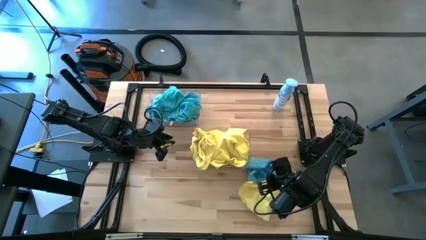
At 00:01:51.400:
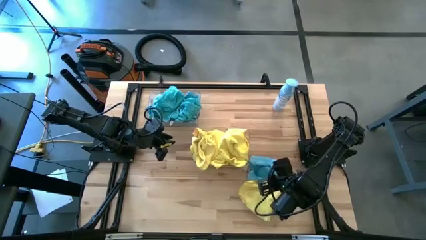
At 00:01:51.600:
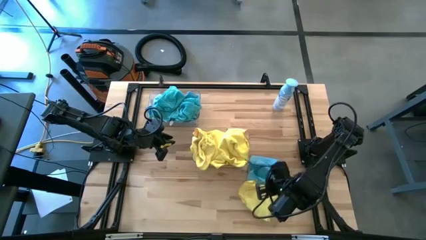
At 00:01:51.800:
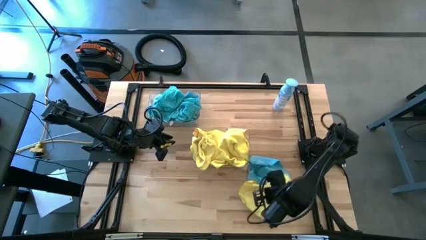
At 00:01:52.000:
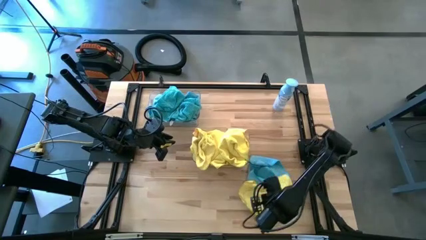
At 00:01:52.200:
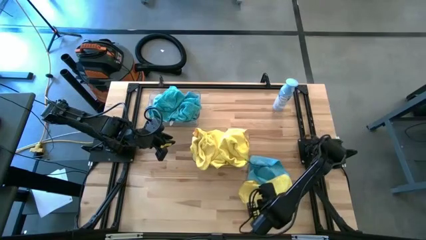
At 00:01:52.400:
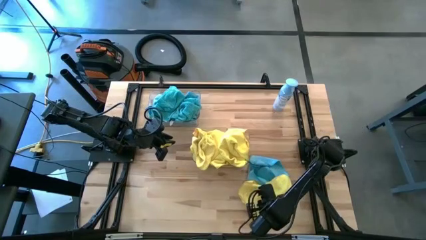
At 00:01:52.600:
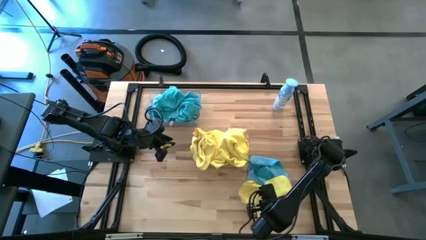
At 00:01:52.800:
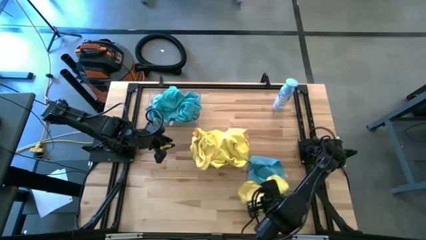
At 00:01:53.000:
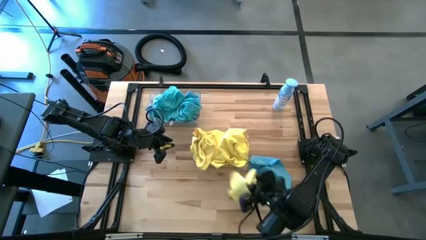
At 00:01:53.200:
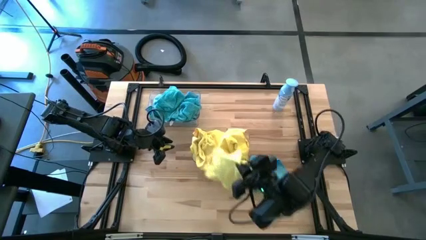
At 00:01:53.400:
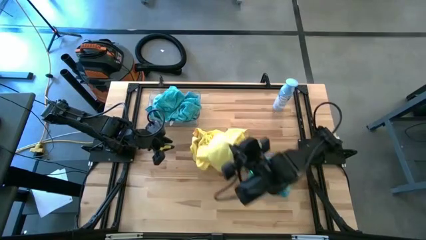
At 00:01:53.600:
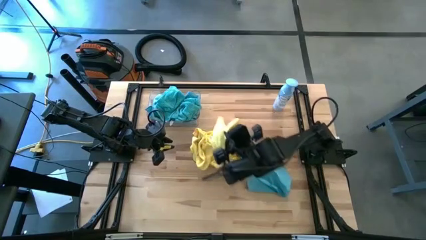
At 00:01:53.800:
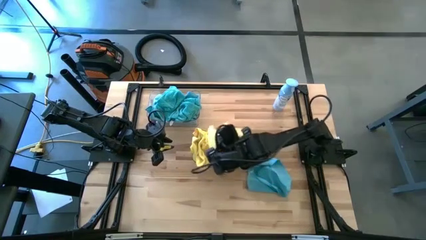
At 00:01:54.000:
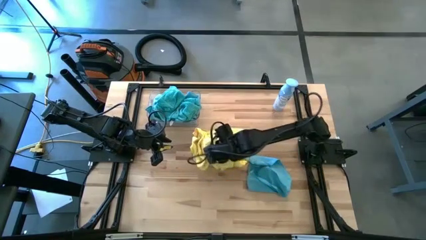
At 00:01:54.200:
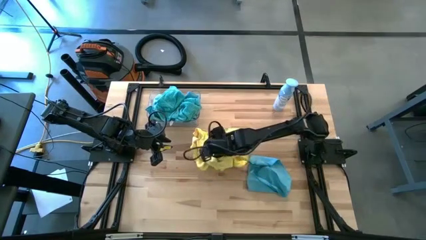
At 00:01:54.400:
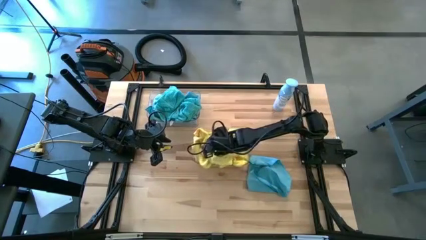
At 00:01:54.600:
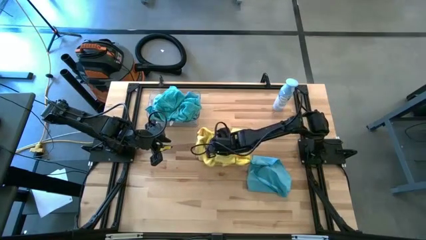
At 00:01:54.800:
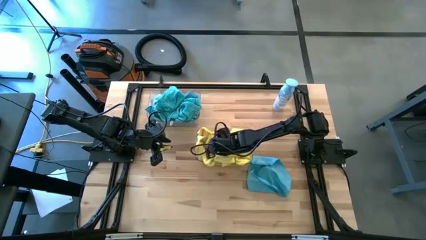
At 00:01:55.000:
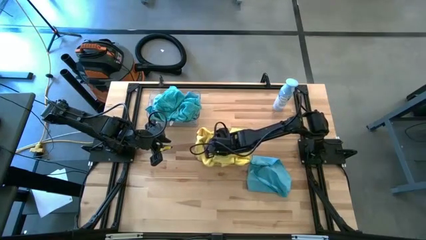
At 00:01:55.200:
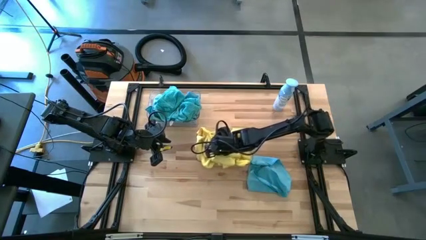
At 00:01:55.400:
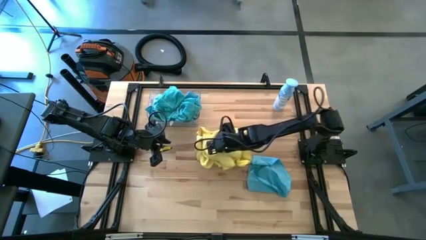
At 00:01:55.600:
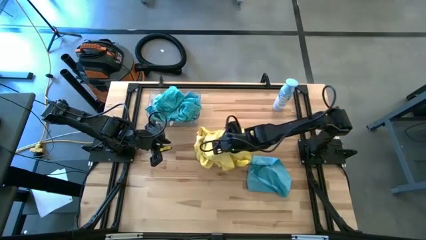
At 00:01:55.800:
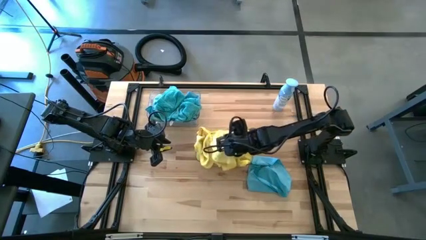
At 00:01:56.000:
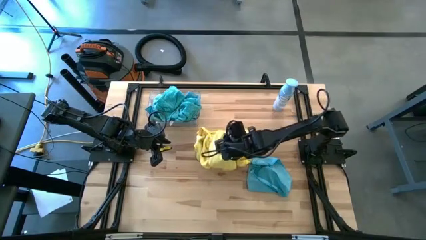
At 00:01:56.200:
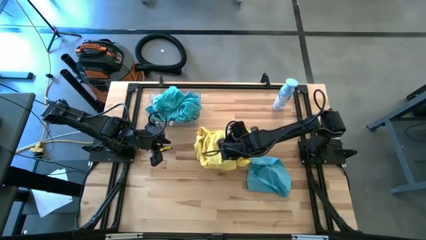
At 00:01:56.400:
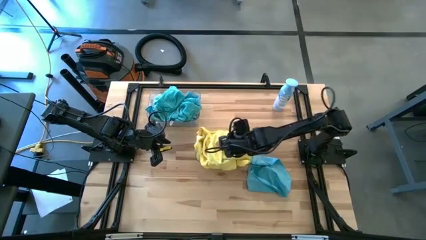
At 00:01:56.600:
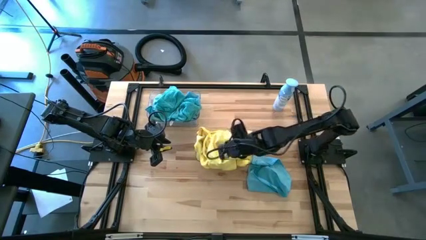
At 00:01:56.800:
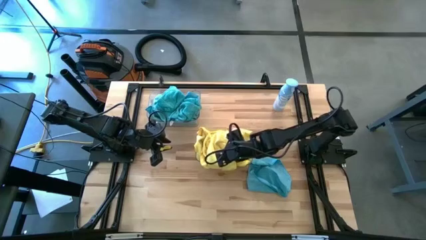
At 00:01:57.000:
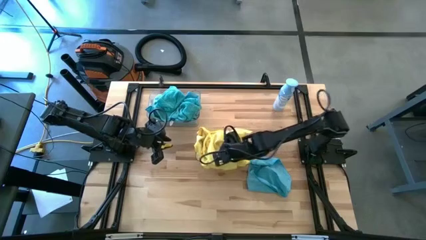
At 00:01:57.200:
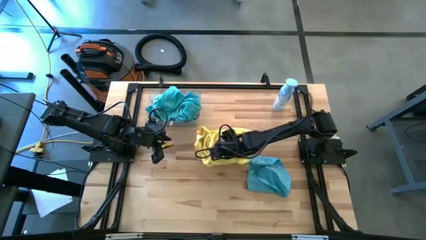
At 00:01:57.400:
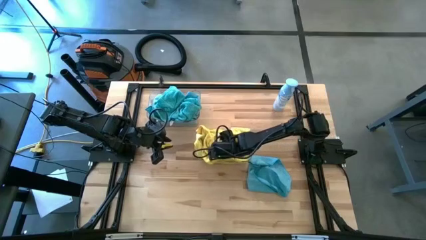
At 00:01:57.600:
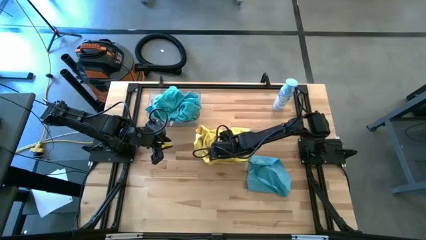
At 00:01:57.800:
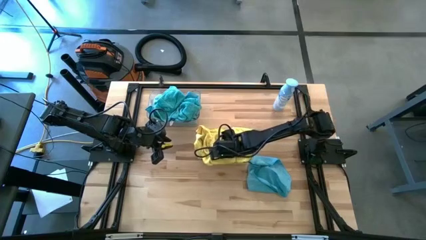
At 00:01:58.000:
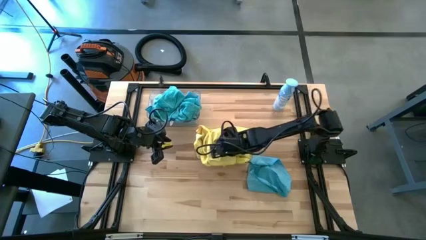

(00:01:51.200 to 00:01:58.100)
Task: Sort microfiber towel by color & place in baskets
Put the yellow towel into the bottom transparent bin

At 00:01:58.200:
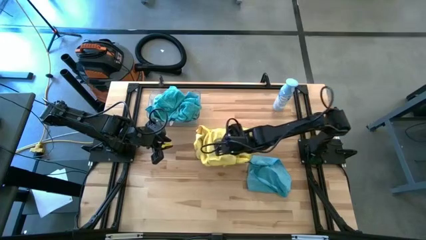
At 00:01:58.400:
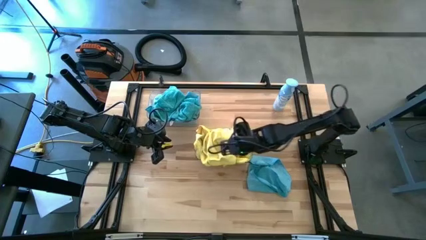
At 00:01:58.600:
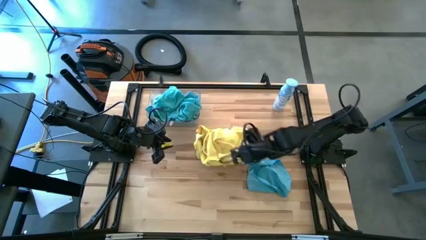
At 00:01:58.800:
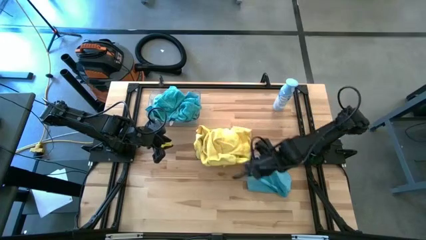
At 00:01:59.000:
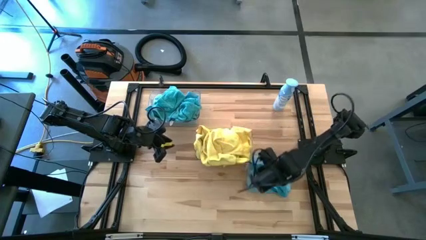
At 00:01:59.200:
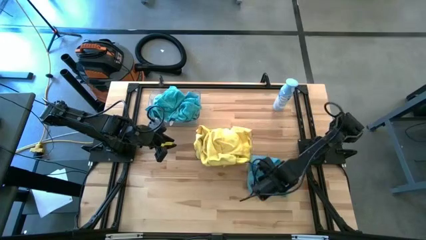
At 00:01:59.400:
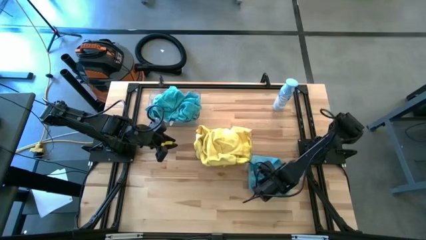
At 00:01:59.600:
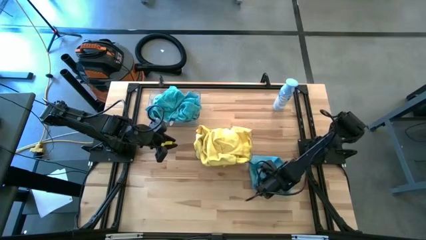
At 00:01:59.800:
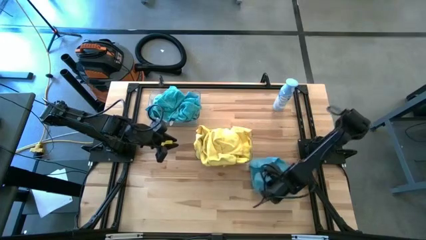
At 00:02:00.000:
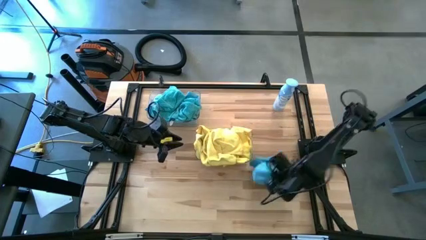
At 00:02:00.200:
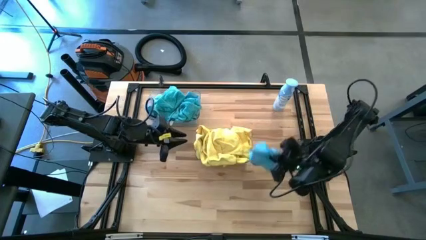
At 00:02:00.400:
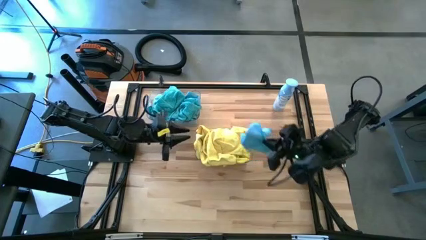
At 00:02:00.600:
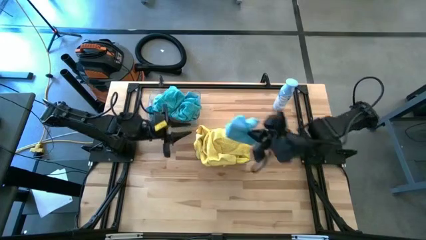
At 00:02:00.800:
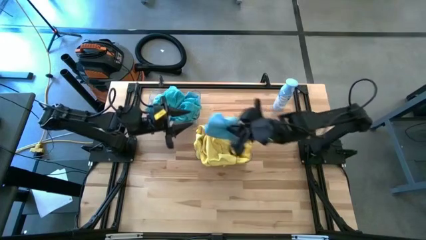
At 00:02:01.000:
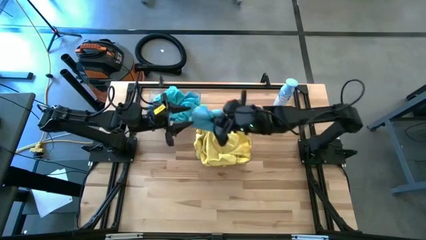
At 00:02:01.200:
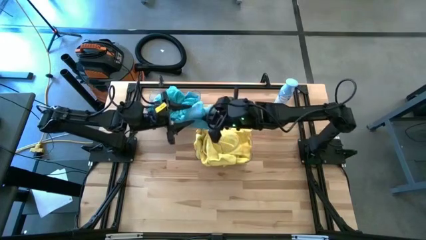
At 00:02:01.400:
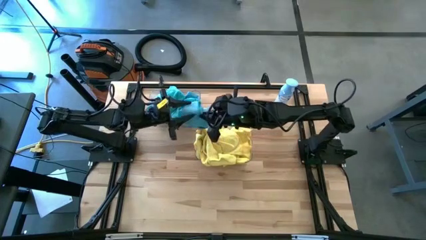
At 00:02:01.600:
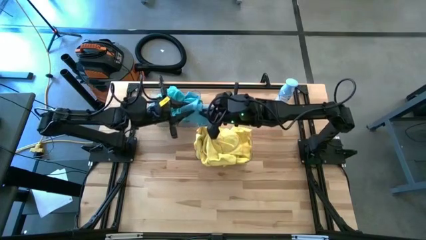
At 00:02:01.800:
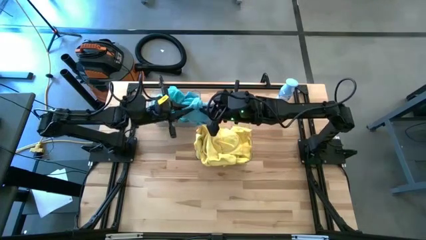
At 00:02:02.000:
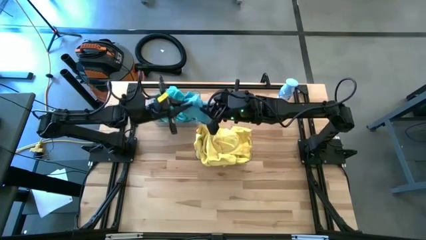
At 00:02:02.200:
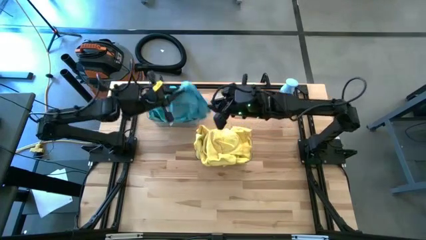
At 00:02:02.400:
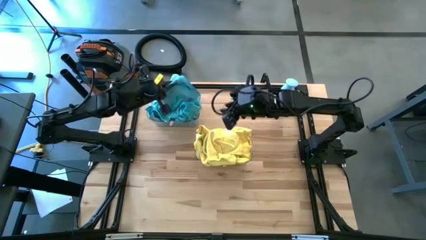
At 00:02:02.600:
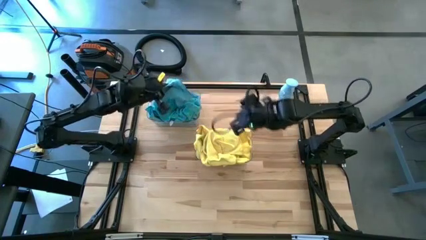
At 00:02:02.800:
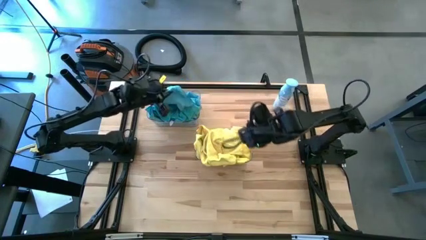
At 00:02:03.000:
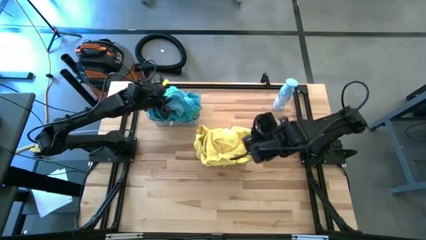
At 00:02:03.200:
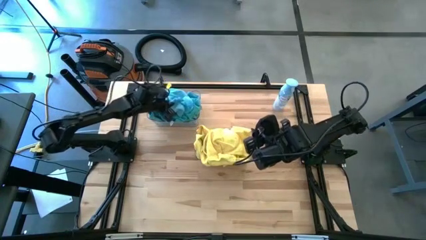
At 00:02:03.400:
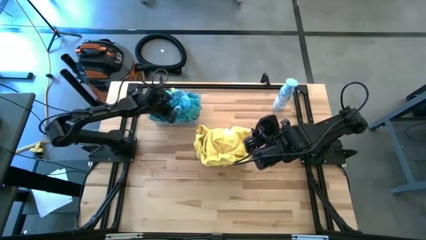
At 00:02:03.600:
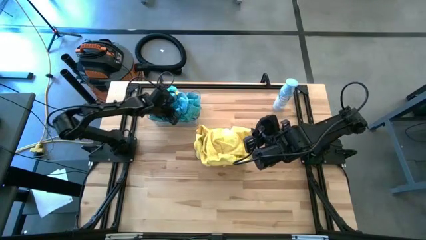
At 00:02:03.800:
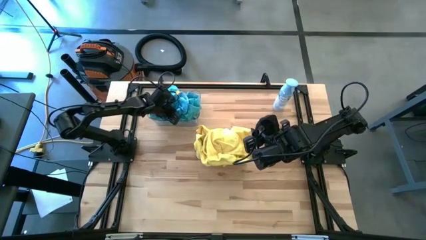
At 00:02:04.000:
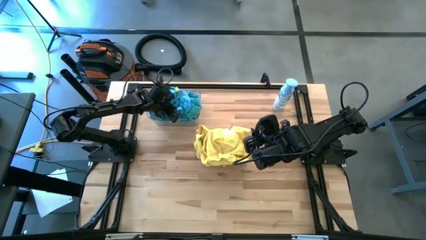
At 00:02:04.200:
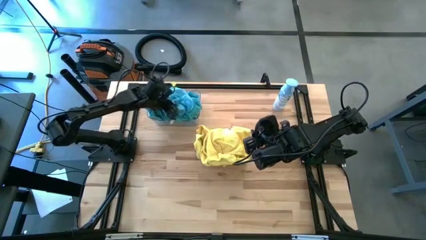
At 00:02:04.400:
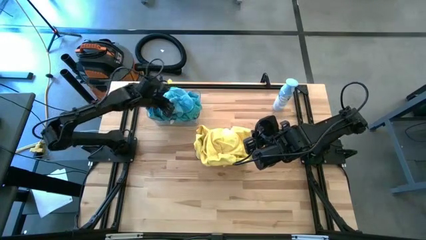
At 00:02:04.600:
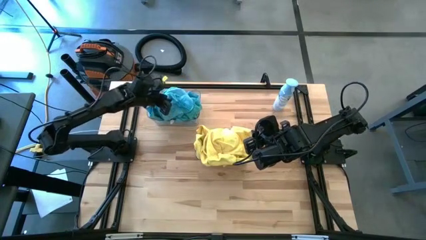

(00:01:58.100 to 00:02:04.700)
Put the blue towel into the top transparent bin

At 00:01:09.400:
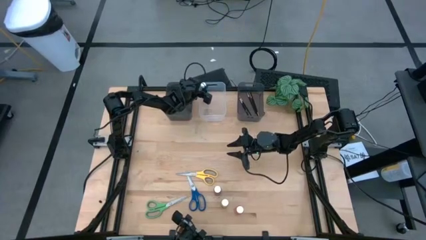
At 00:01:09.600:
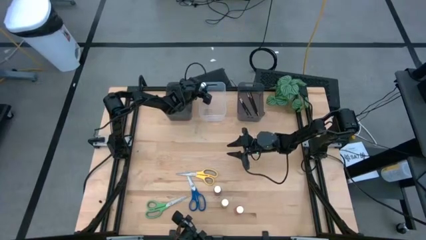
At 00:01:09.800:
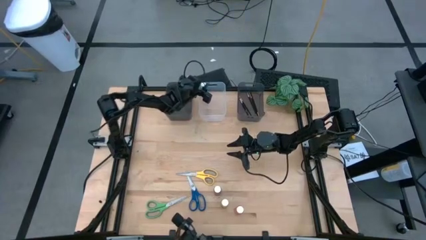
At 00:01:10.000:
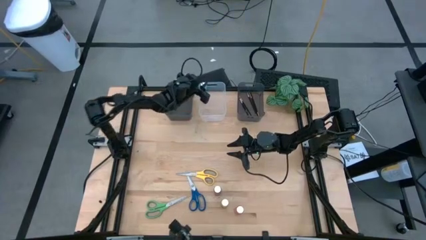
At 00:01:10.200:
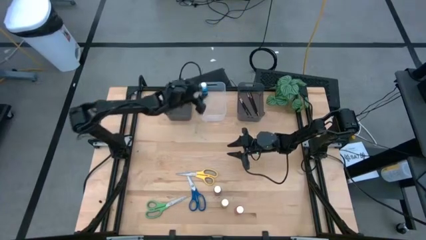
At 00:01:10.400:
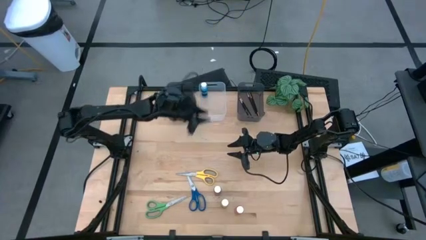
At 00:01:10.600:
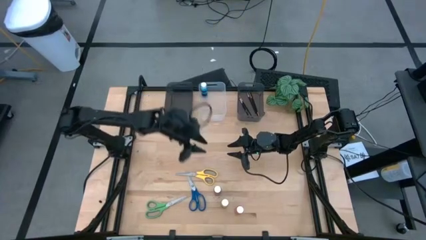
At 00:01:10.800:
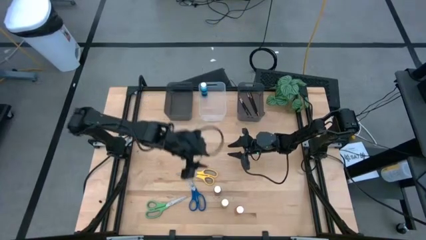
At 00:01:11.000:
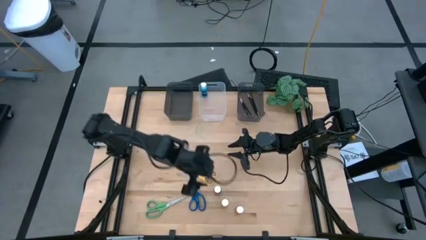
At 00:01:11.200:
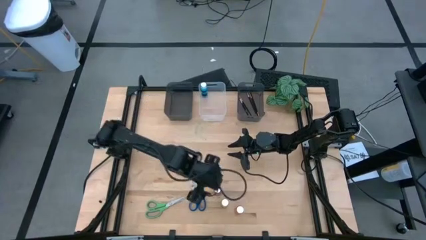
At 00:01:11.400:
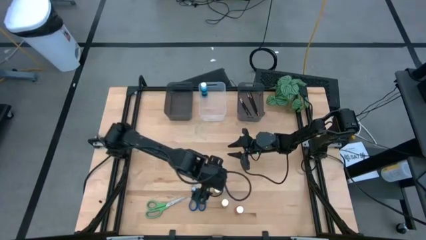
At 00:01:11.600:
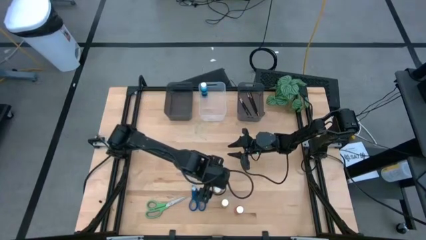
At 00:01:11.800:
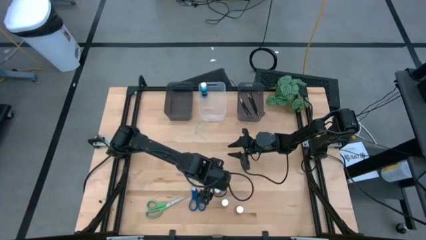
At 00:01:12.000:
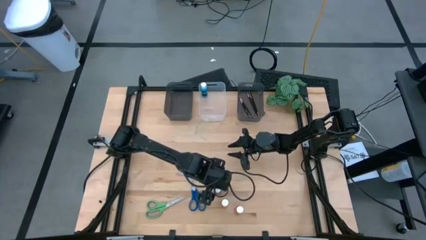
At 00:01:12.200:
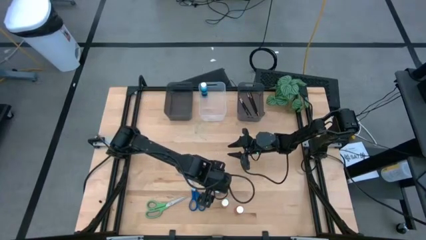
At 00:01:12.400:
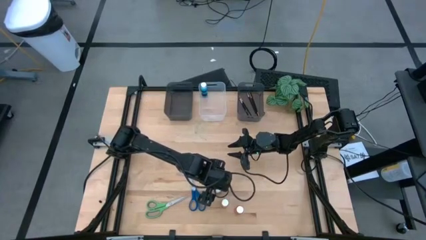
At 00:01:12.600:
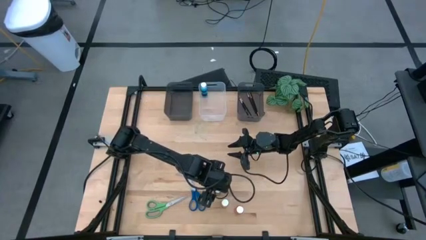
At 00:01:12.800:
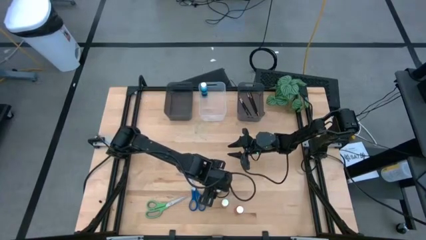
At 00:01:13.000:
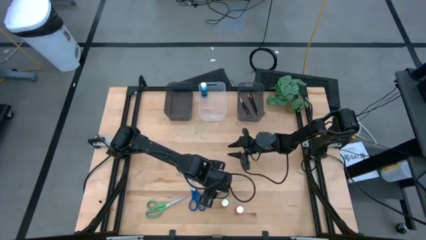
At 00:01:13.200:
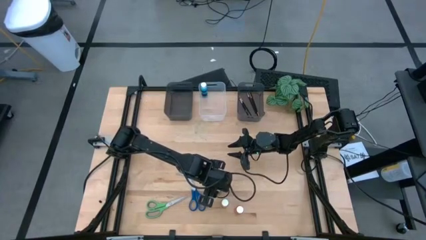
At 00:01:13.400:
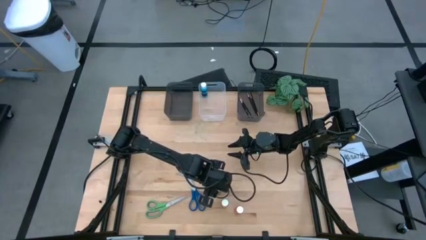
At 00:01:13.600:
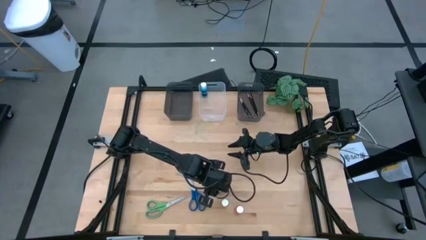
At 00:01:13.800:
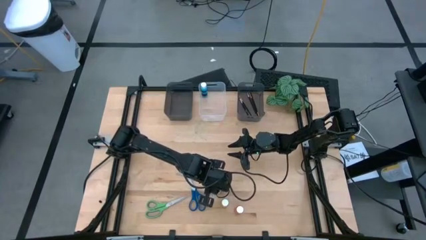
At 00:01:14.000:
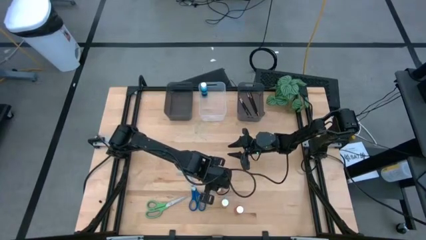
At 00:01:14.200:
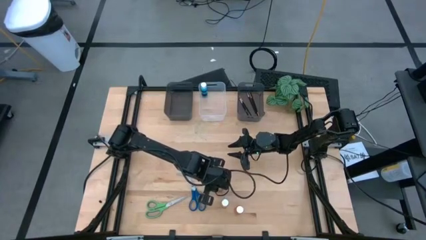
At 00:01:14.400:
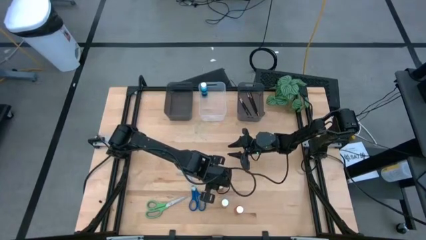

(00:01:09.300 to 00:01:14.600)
Task: Pick & Place Paint Supplies
Put the brown paint bottle into the transparent bin
